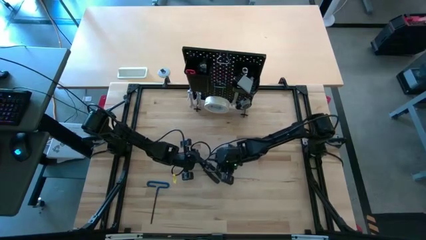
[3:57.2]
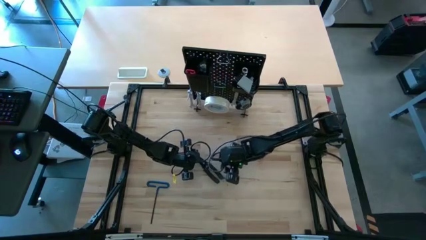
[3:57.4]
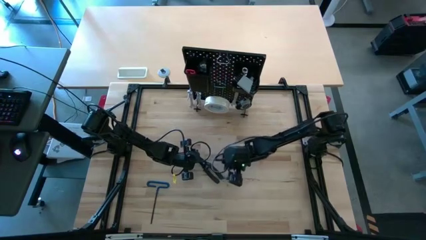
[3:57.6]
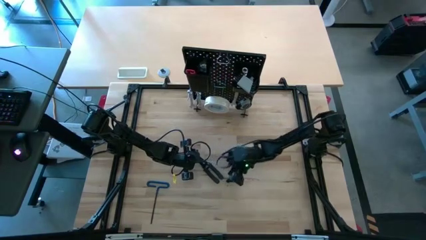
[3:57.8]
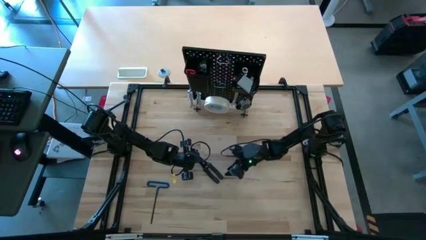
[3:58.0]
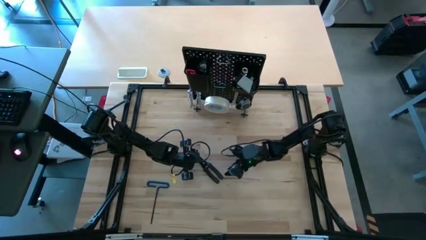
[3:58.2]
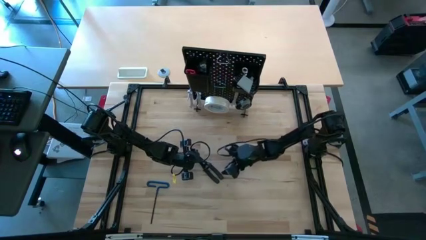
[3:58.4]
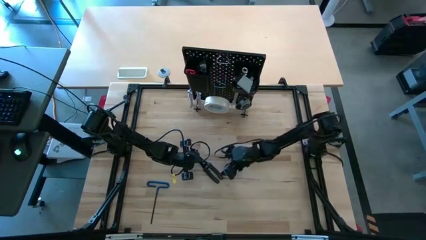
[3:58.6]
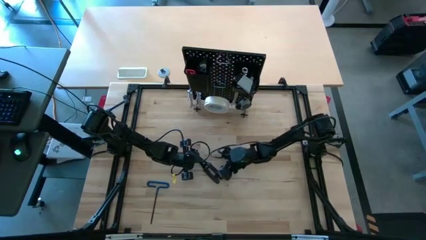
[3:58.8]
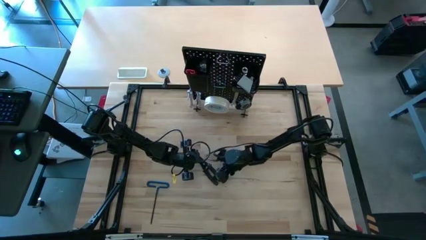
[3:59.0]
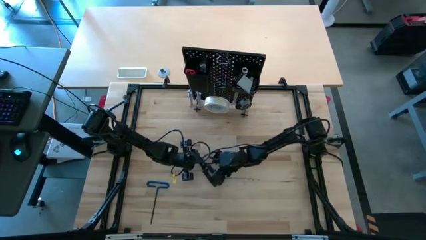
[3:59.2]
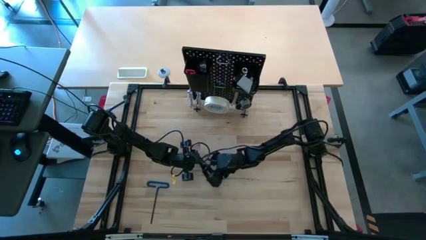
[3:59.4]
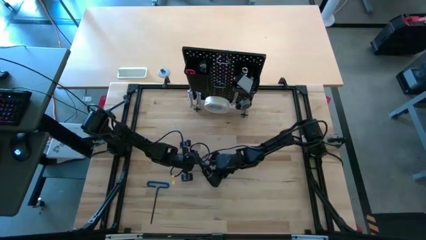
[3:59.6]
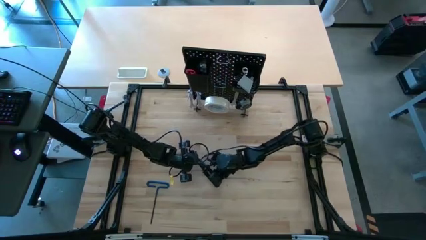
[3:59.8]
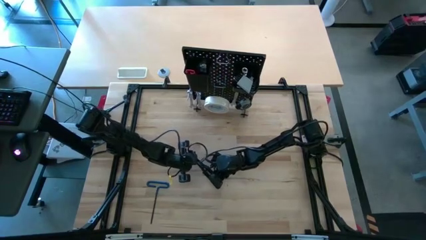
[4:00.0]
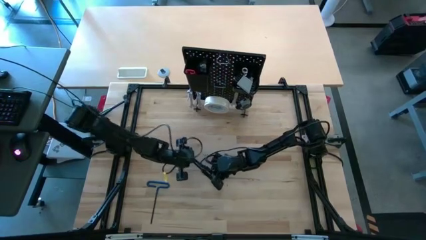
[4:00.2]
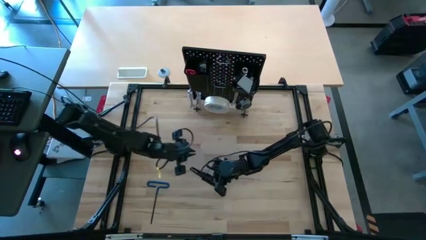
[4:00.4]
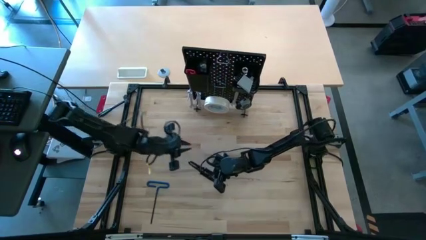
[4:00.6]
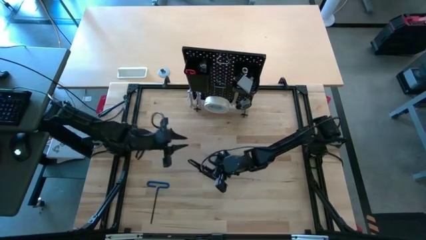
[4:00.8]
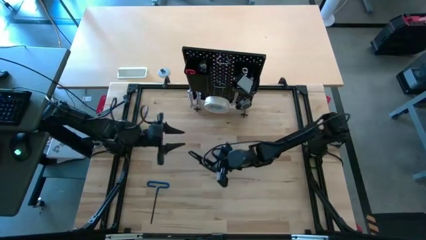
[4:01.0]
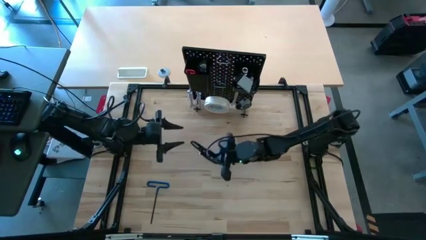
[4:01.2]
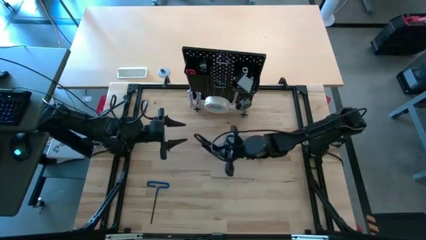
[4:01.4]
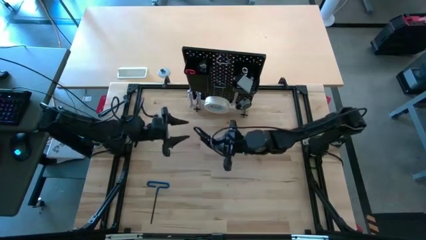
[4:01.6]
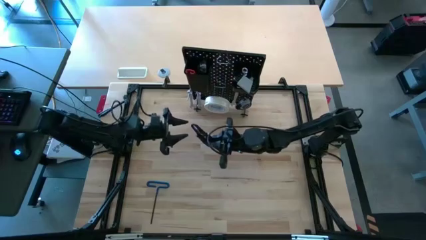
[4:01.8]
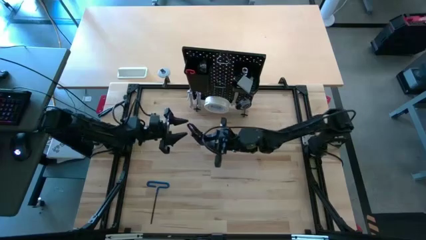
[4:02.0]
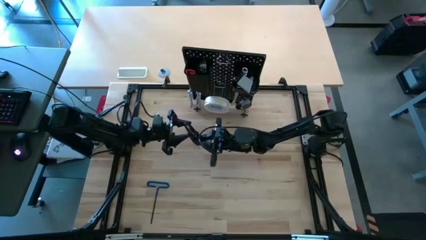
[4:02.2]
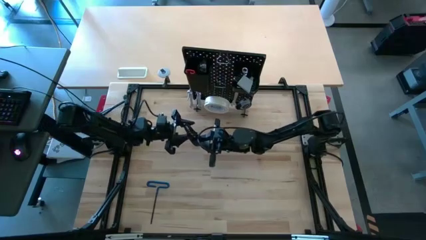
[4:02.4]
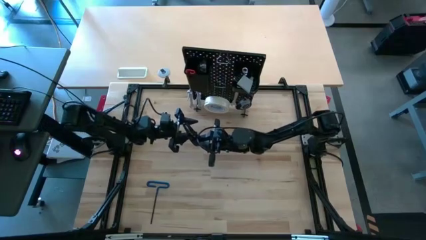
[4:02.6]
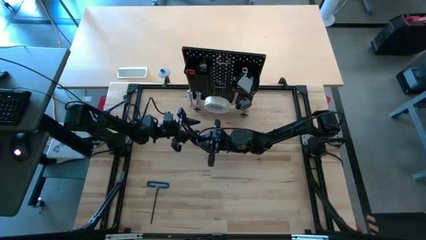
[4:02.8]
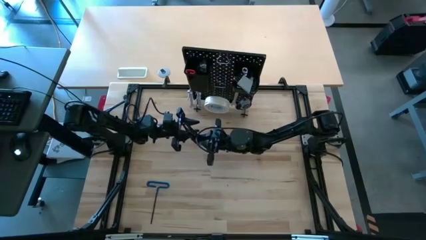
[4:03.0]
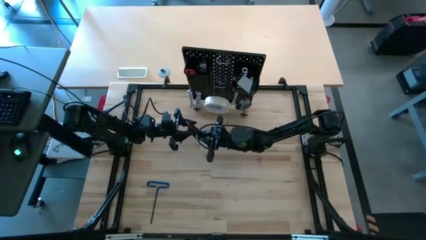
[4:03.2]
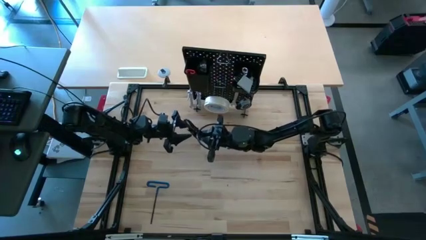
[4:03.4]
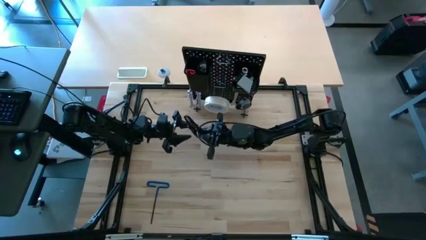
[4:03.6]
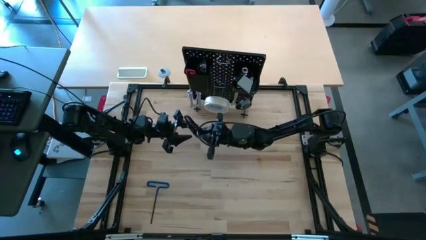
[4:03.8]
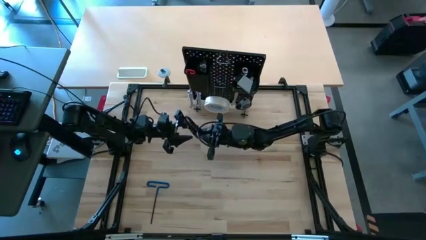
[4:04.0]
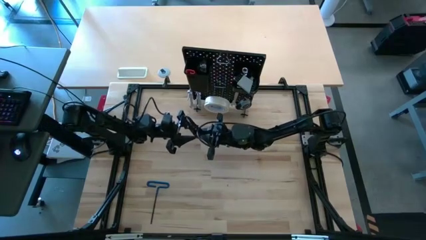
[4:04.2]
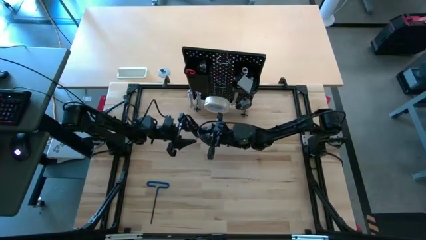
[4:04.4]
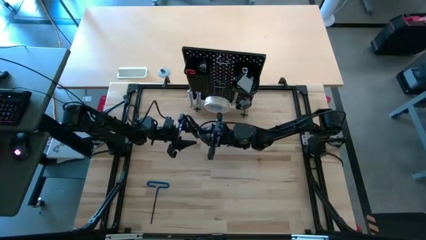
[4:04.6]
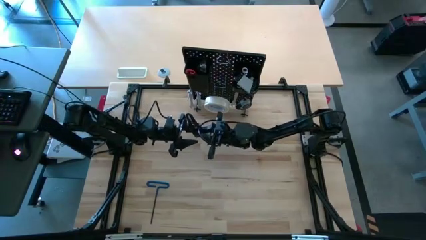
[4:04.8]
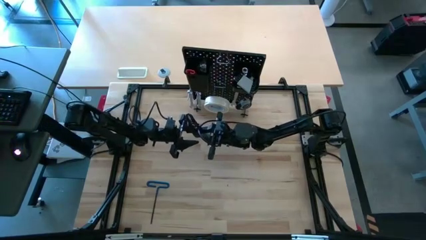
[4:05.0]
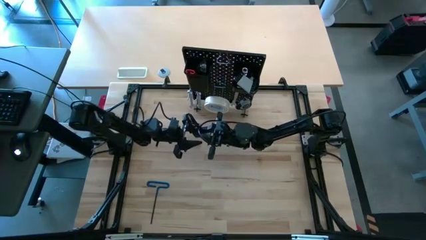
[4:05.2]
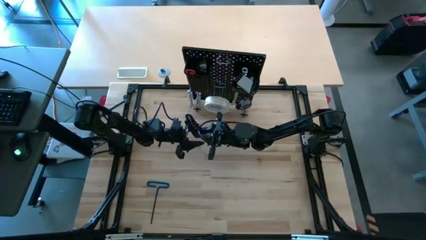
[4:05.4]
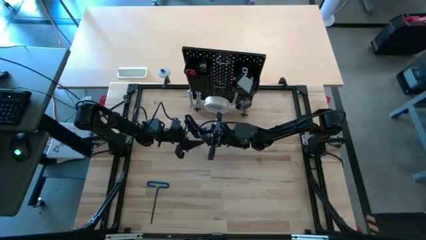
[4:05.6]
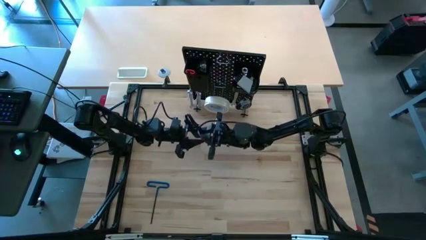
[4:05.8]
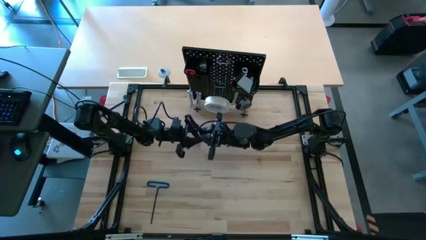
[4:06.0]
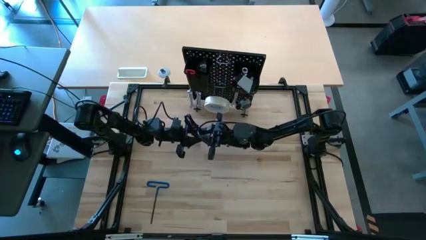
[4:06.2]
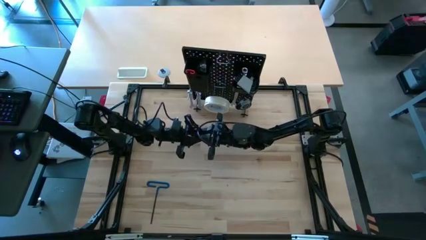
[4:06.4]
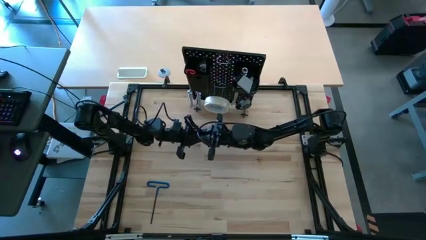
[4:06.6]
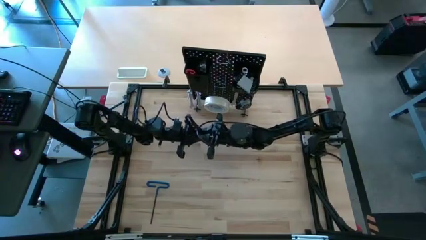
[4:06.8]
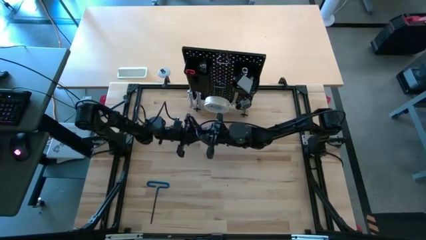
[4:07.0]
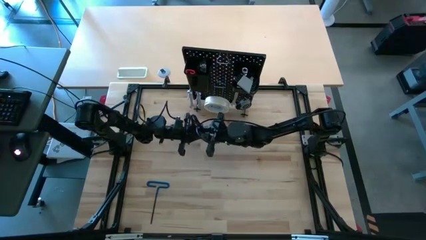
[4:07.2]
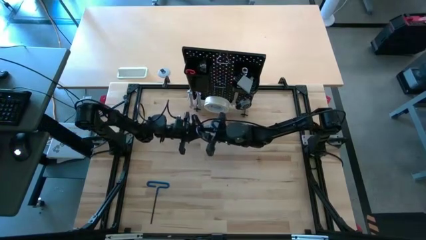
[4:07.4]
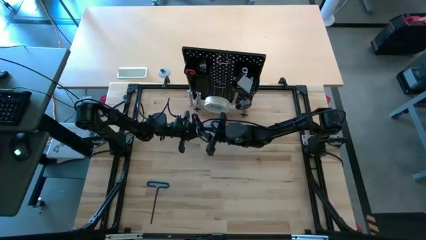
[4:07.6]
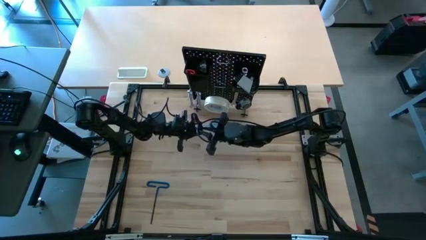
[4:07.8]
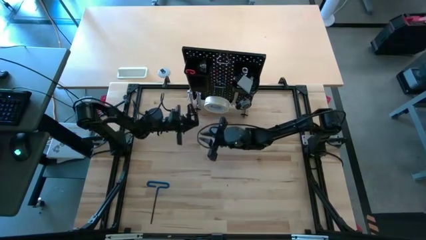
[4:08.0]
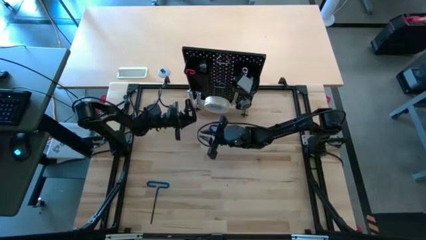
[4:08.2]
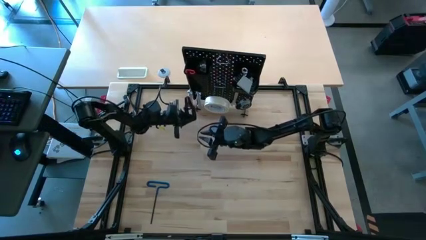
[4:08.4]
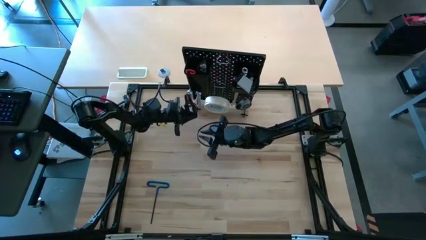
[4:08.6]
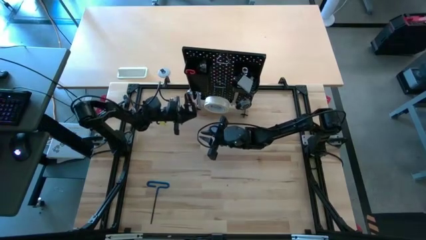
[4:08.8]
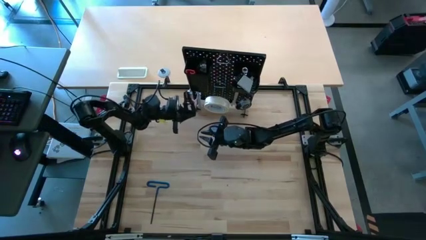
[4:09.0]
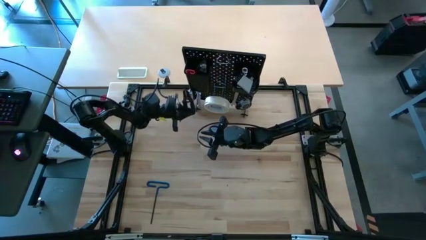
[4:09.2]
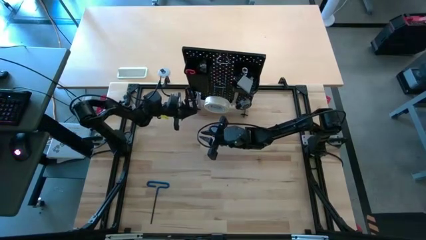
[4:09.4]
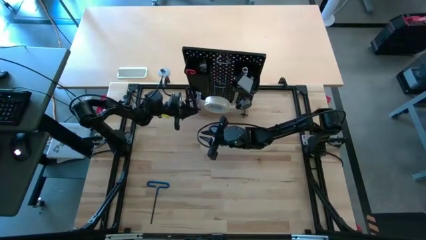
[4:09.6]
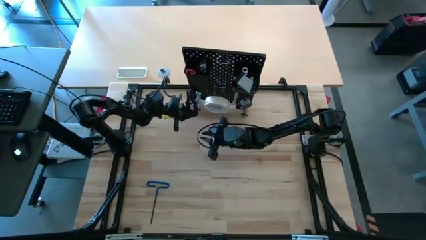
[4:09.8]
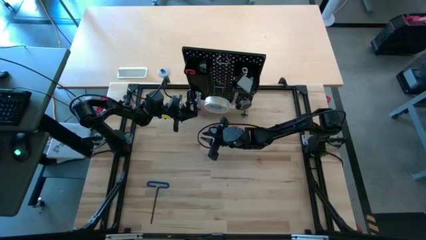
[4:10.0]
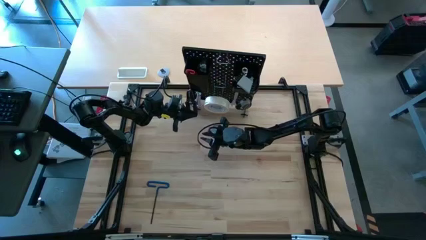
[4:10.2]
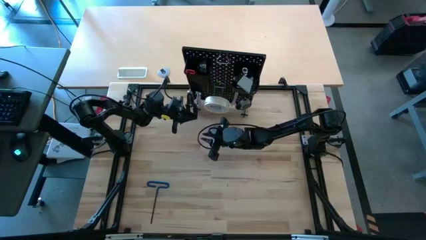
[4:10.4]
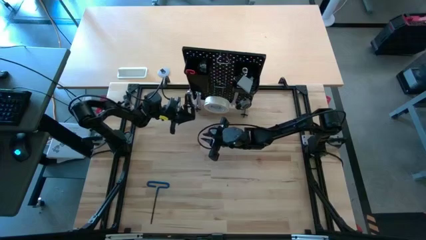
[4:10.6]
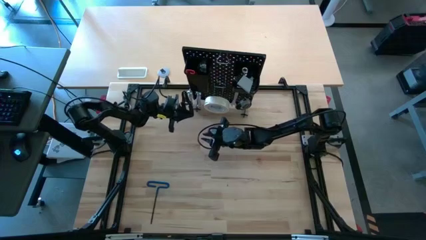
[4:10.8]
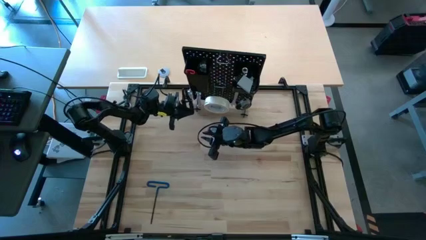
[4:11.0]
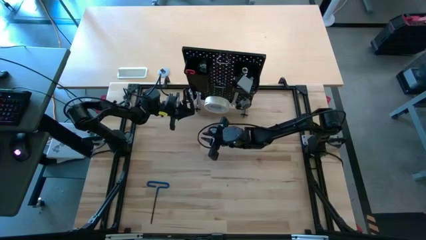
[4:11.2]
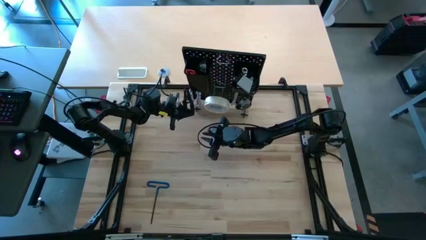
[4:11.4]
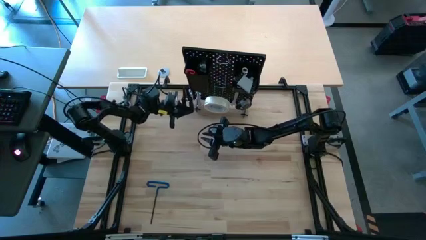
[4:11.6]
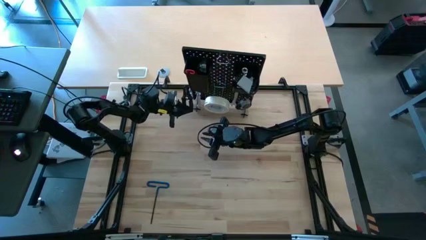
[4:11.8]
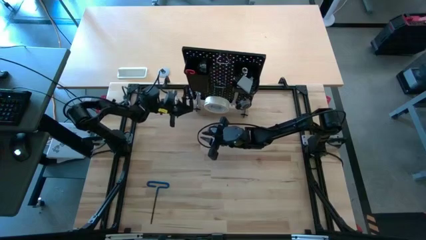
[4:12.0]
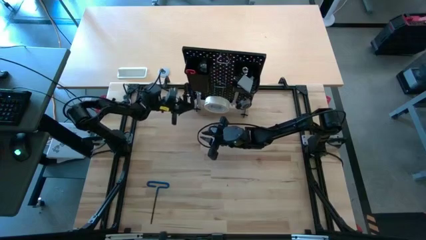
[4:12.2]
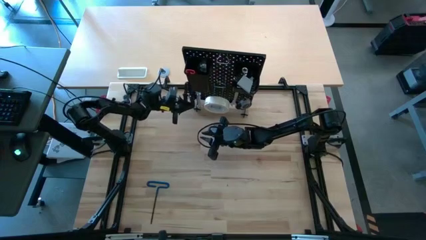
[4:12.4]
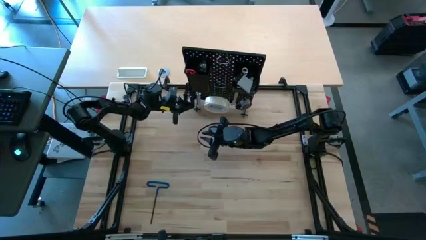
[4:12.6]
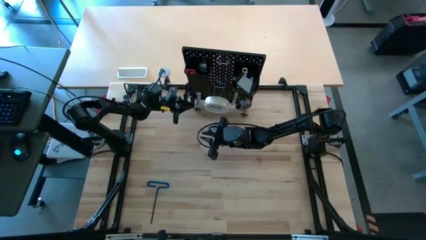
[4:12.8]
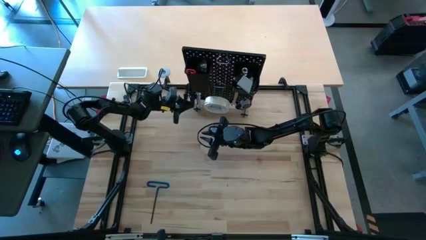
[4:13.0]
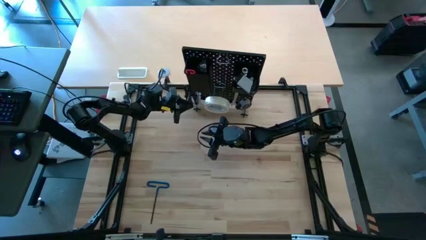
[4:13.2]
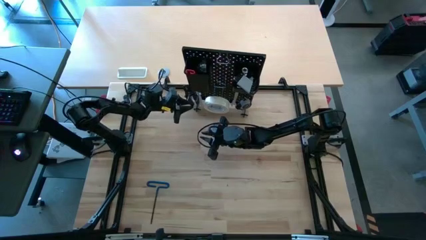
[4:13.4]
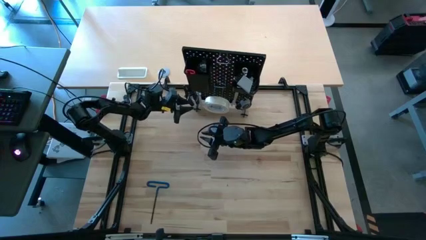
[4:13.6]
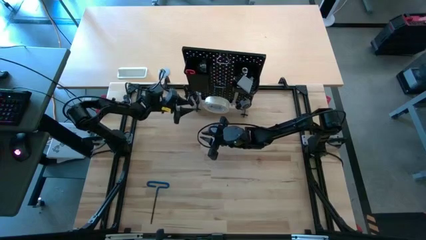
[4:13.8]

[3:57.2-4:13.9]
Task: Hang tools onto peg board
Hang the black cable cutter on the pegboard bin

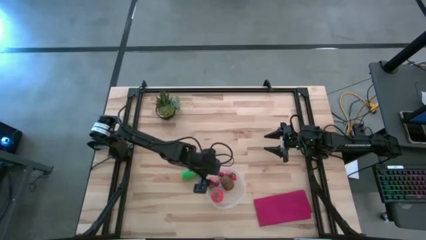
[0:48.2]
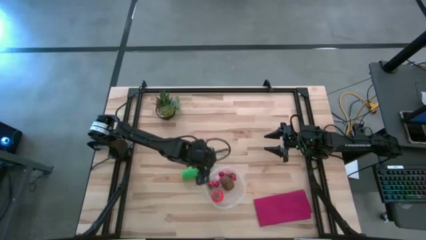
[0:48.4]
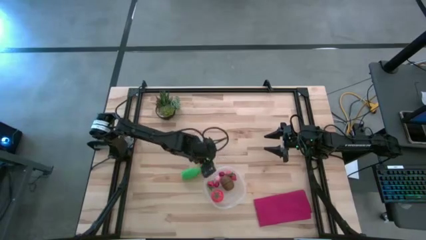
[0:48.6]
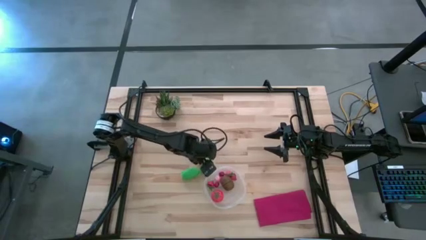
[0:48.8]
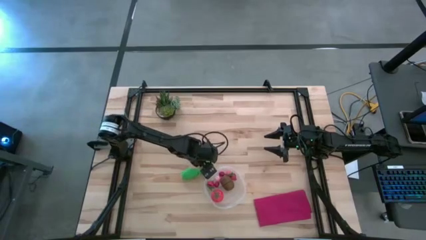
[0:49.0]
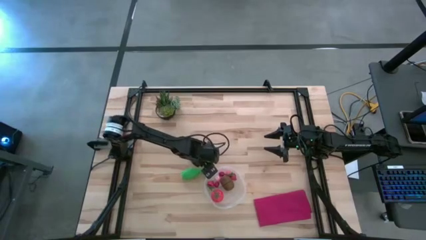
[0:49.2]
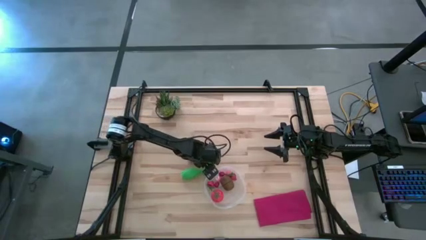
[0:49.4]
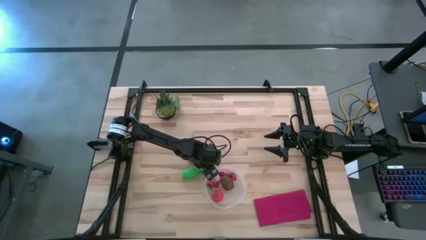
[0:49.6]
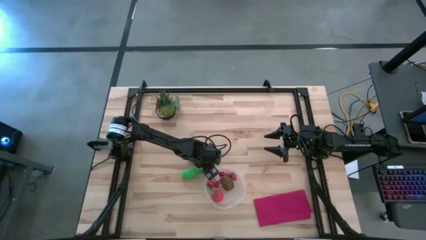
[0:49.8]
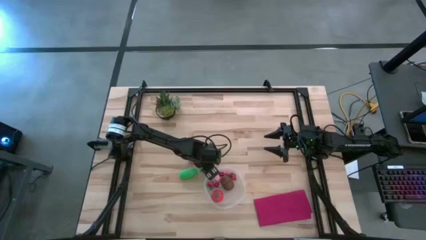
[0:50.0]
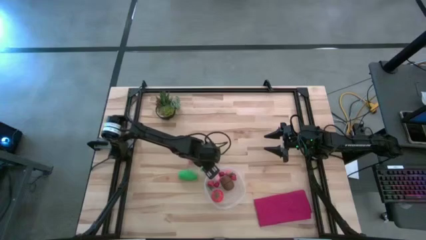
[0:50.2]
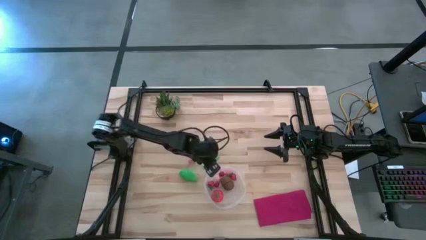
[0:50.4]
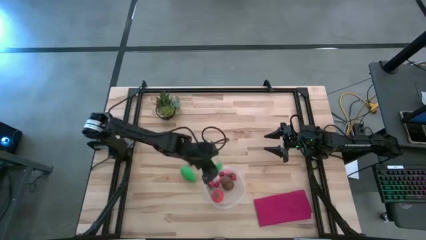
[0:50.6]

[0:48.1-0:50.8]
Task: Pick and placing Produce into tupperware
Put the green peas into the transparent bin
